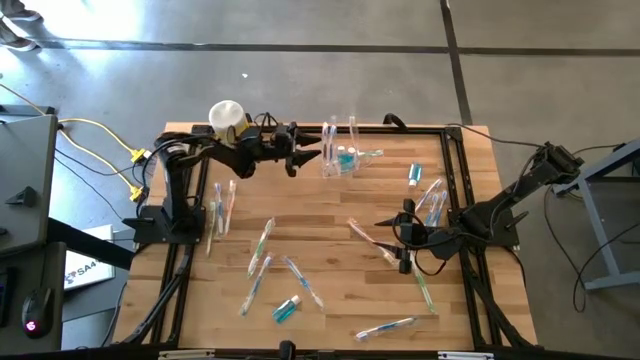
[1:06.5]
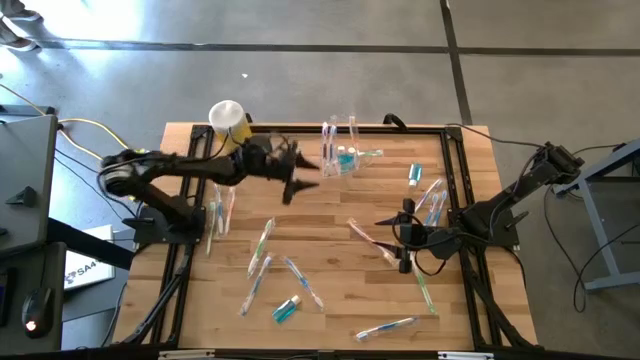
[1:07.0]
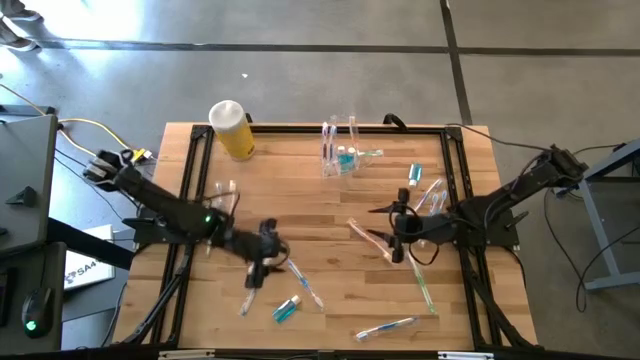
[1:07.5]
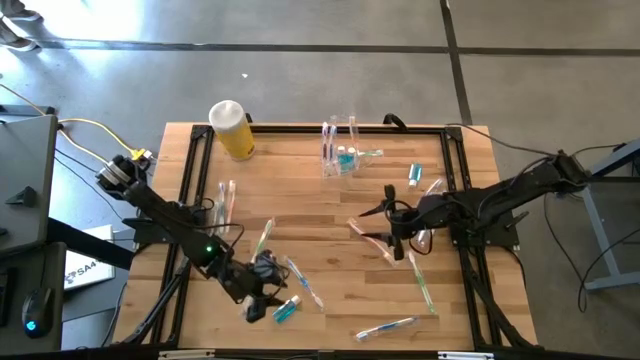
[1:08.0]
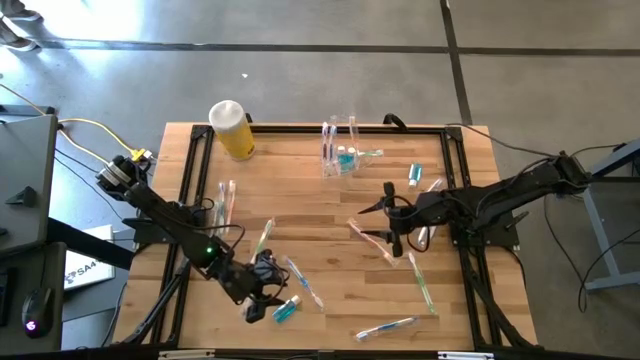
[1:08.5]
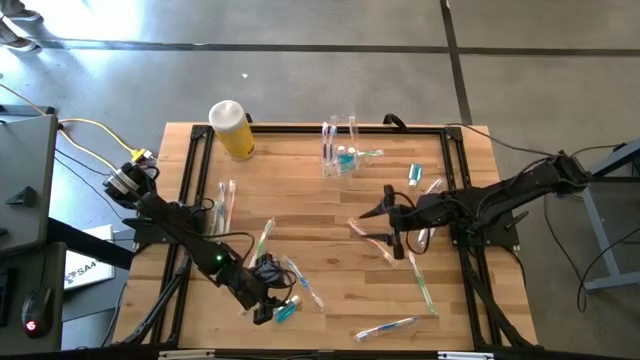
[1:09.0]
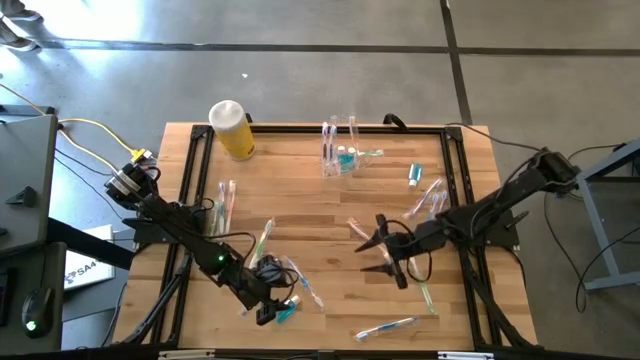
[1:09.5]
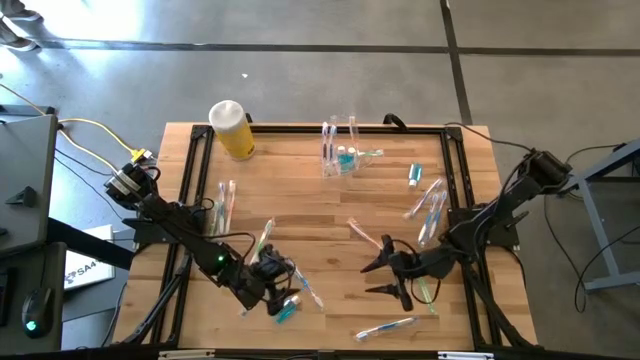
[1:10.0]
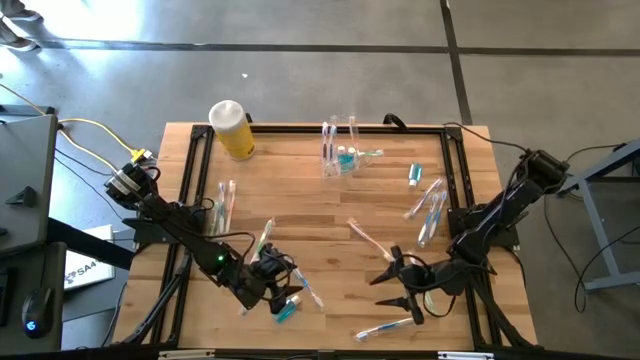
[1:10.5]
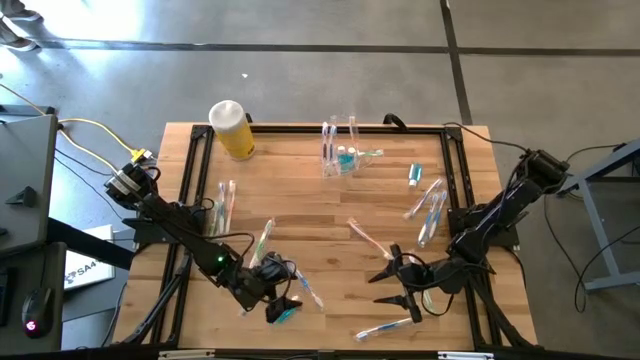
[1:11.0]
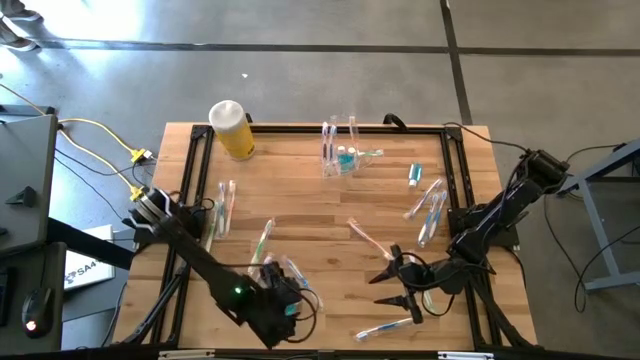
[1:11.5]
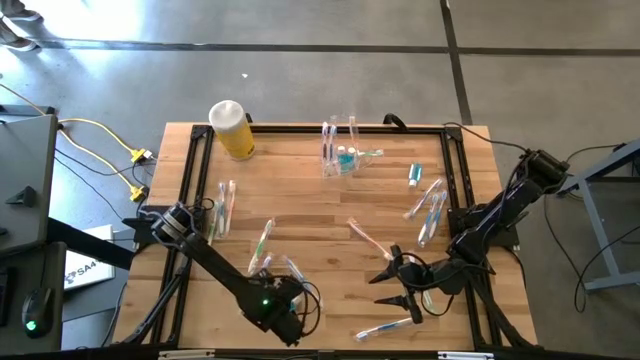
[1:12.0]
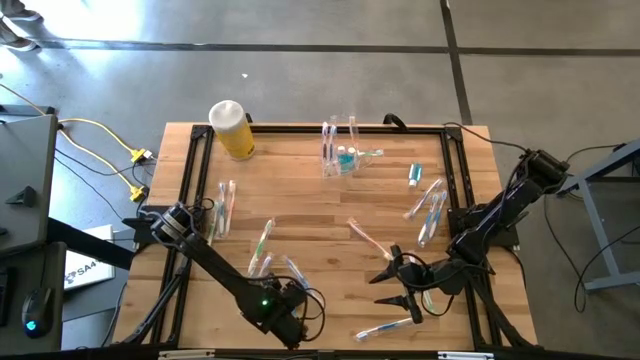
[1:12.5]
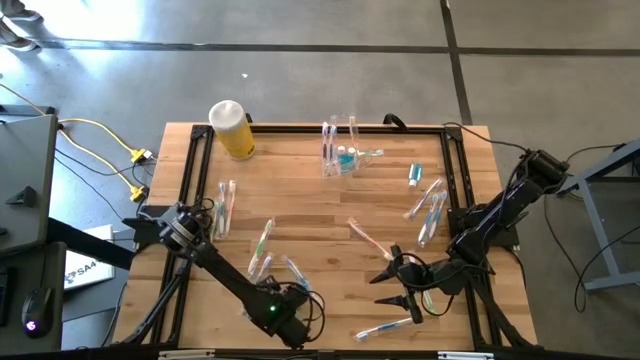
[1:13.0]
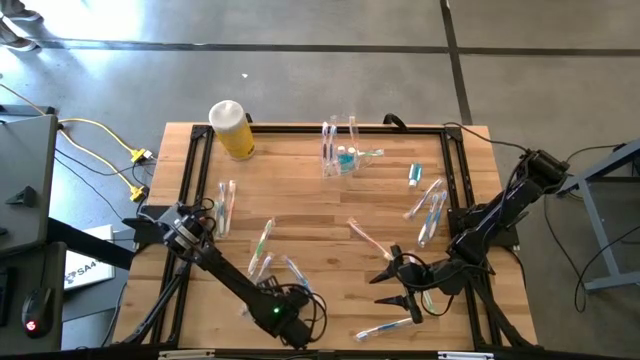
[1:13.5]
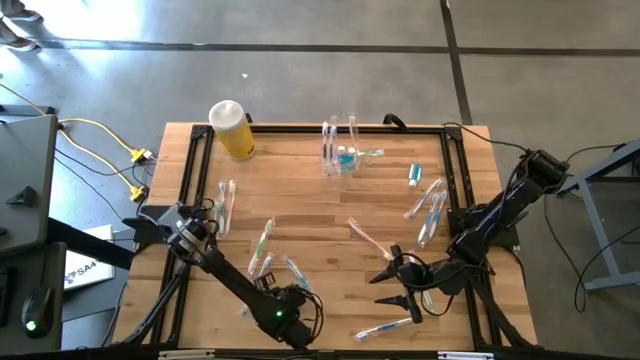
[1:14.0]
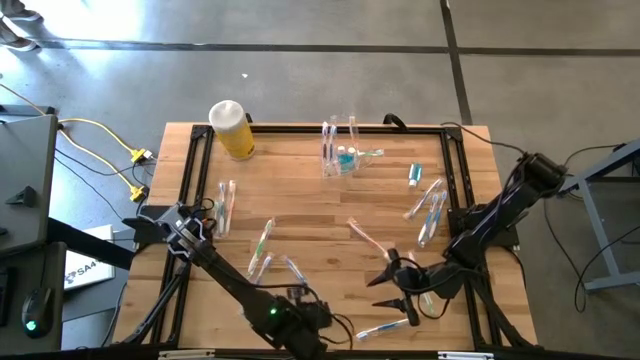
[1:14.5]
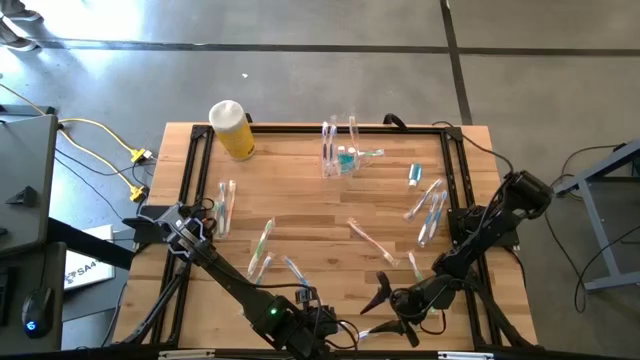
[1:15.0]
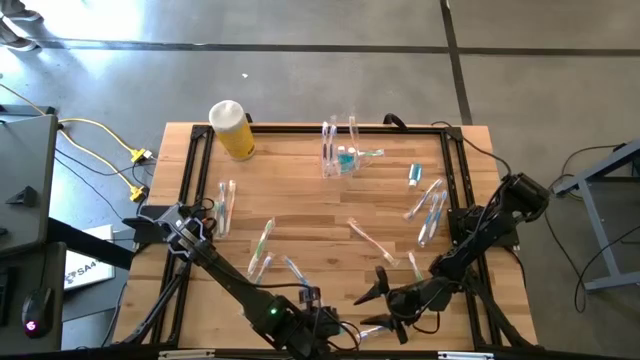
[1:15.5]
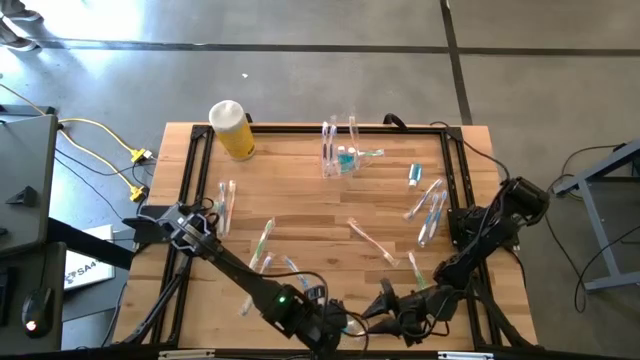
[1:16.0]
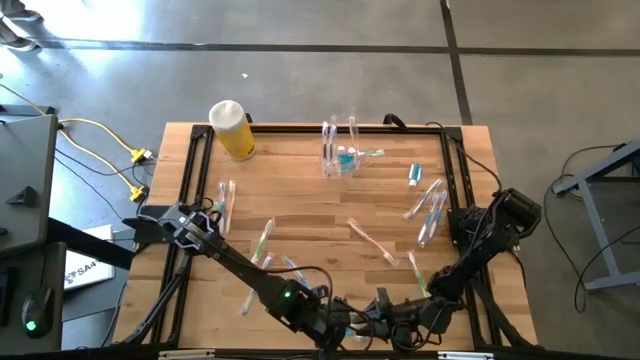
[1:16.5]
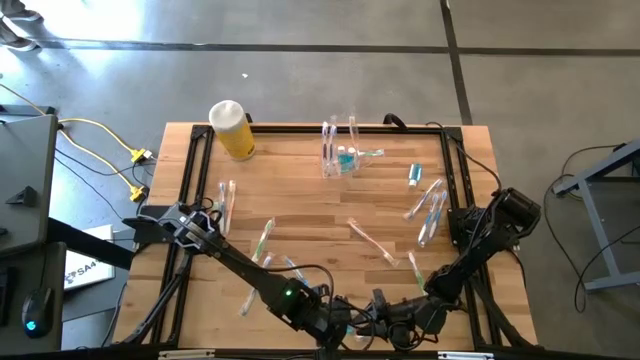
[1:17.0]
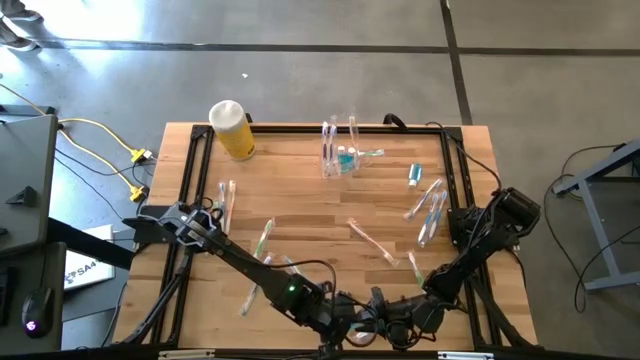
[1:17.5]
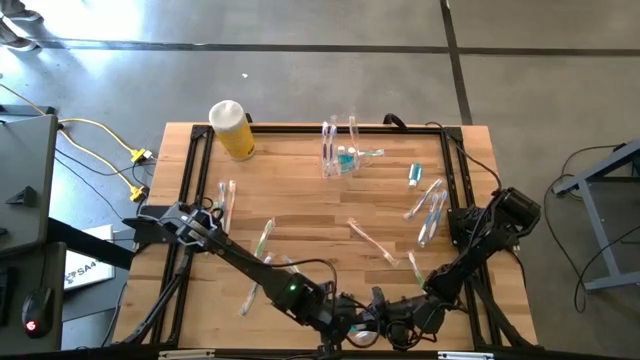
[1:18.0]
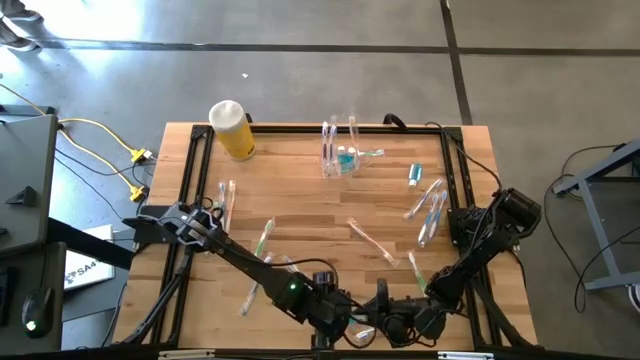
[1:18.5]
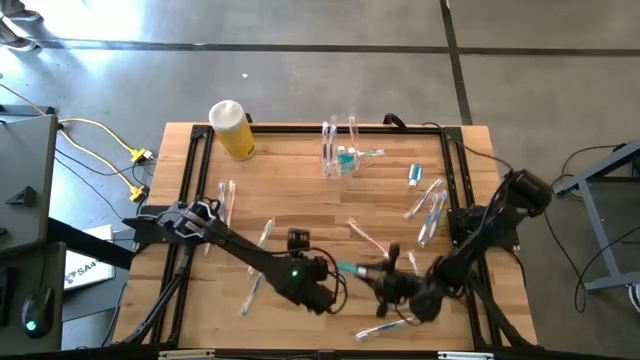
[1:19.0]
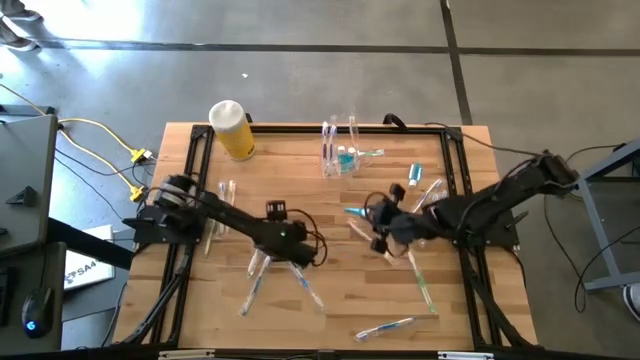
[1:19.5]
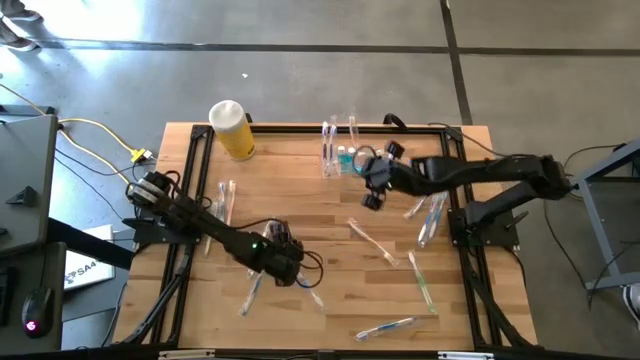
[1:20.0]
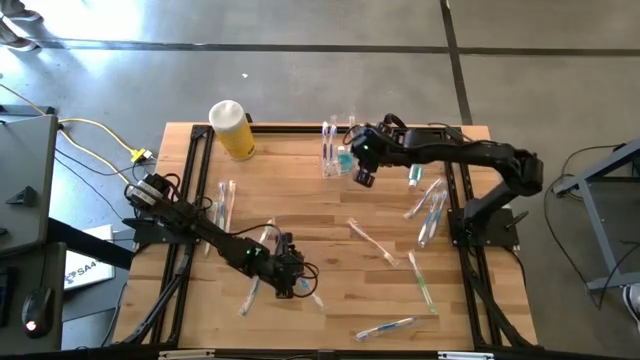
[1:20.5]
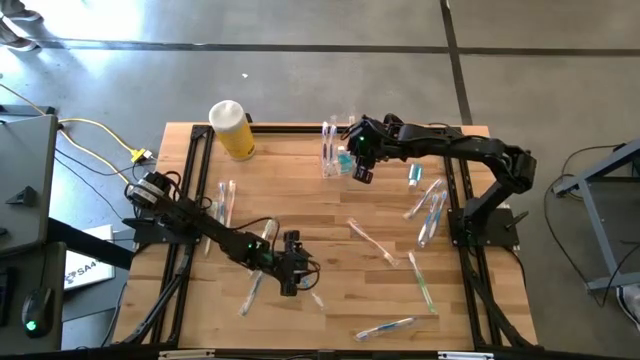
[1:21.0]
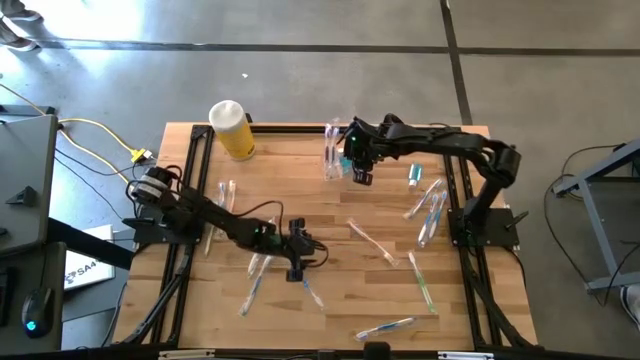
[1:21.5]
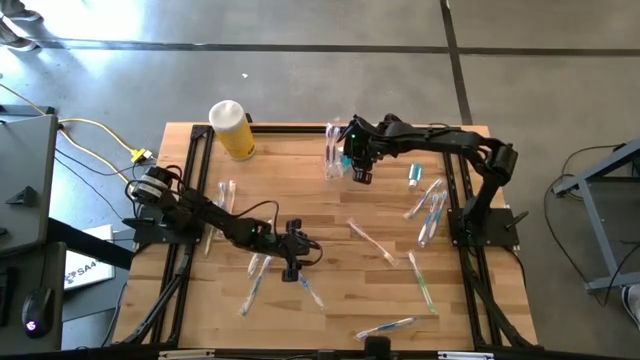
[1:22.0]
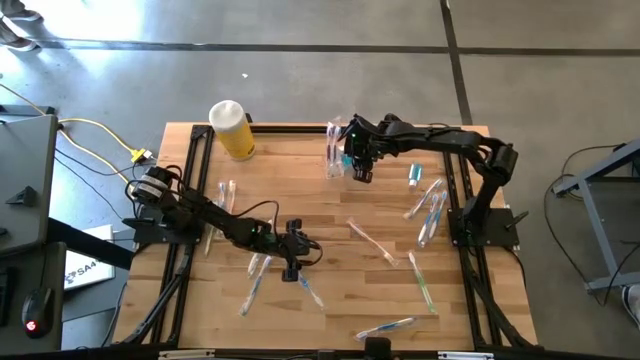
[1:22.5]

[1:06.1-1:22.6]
Task: Pick & Place toothbrushing station
Put the blue mouthwash bottle into the transparent organizer

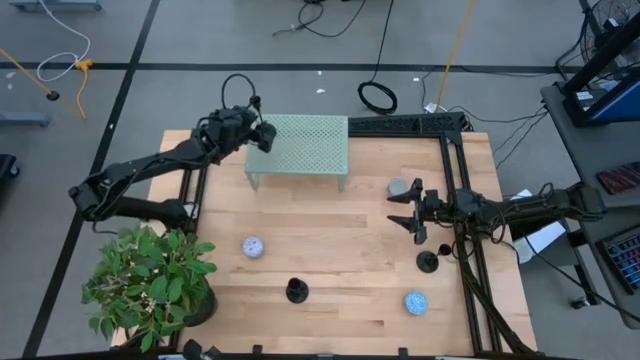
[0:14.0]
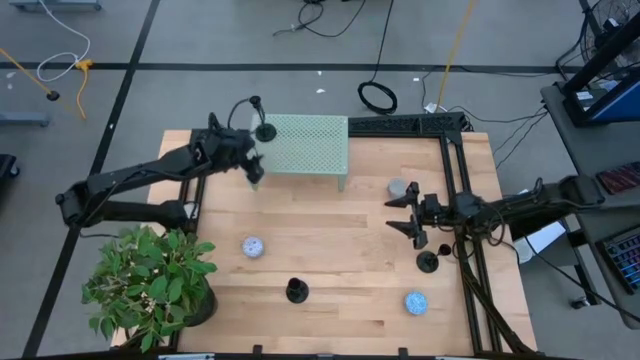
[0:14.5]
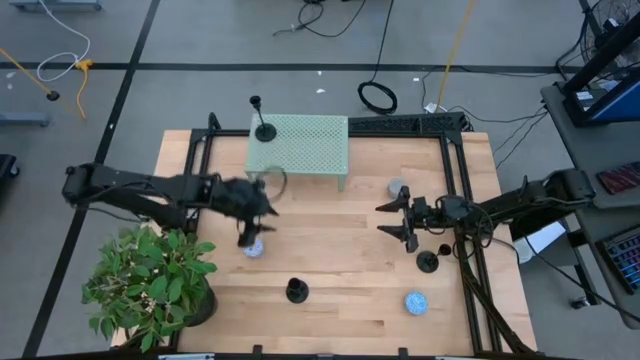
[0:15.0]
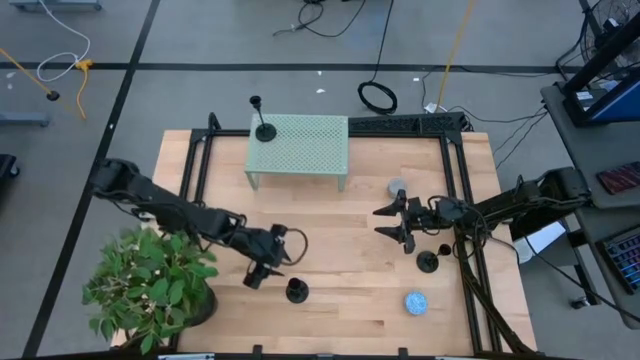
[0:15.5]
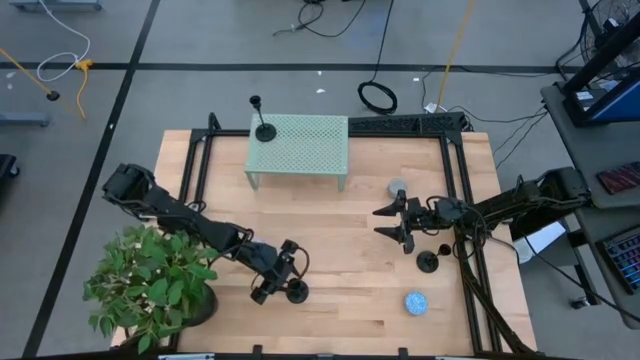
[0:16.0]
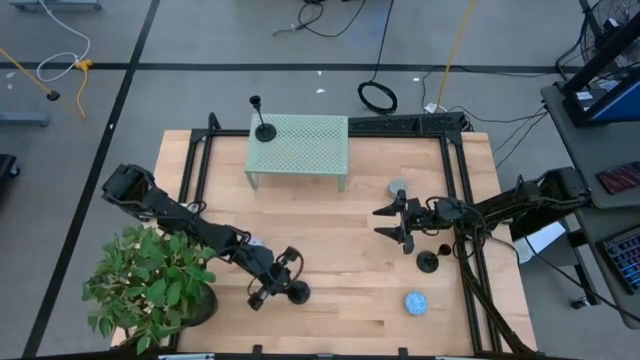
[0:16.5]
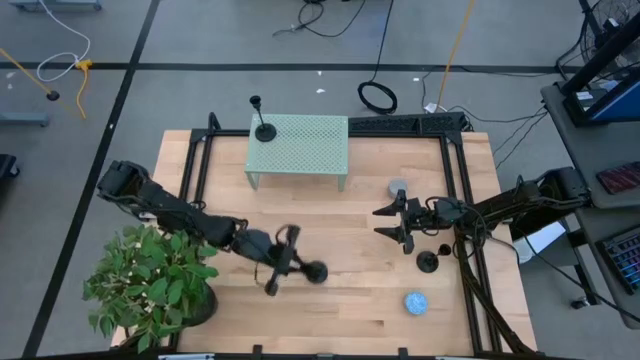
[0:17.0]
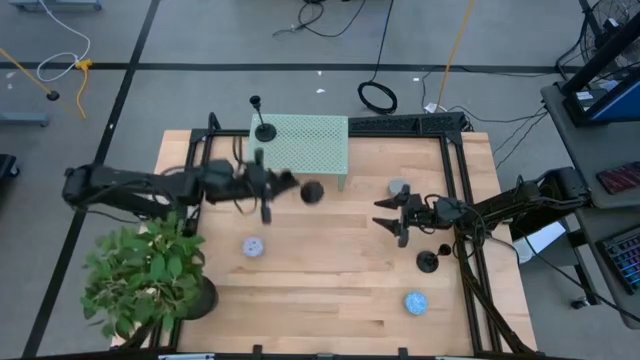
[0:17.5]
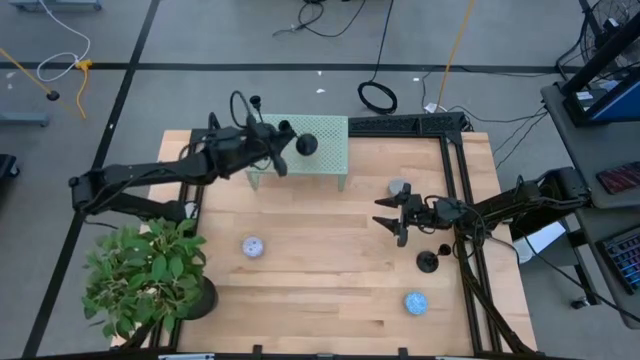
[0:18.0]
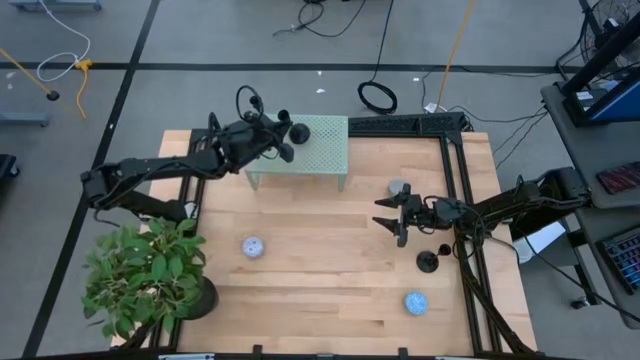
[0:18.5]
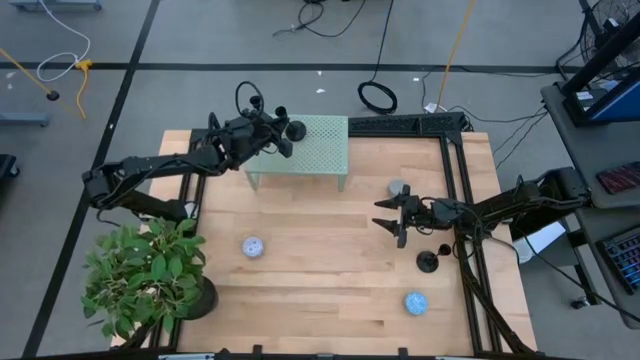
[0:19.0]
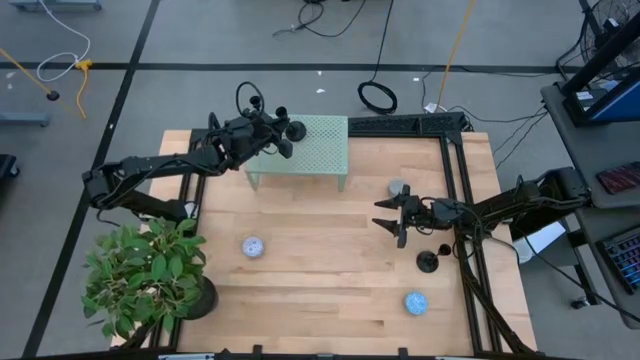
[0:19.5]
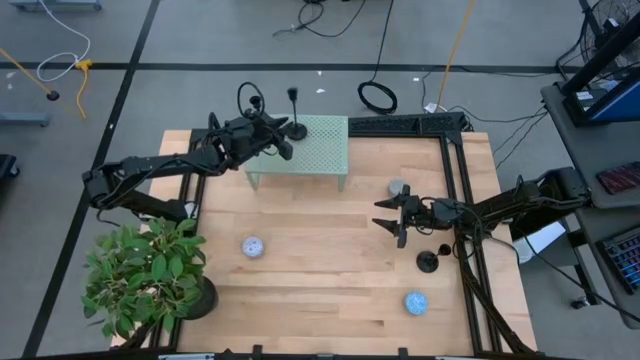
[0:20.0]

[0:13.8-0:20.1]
Task: Pick & Place candle stick holders
Put the left black candle holder on the shelf
